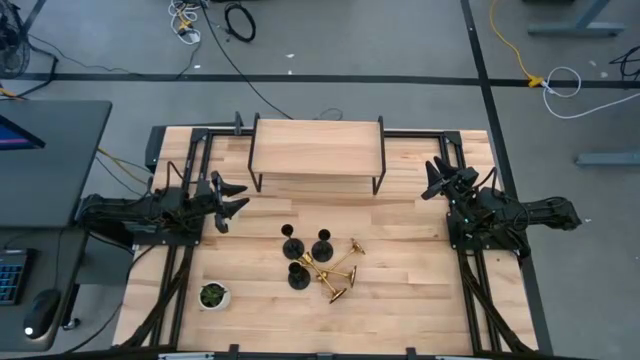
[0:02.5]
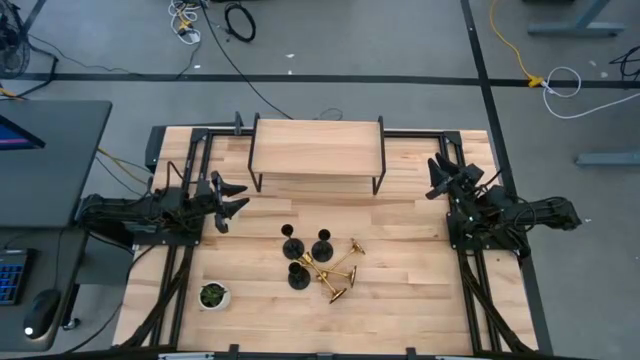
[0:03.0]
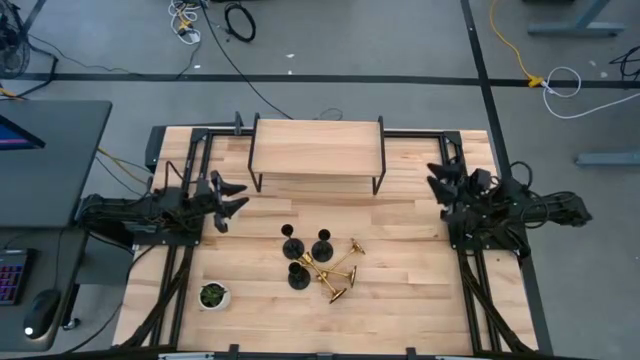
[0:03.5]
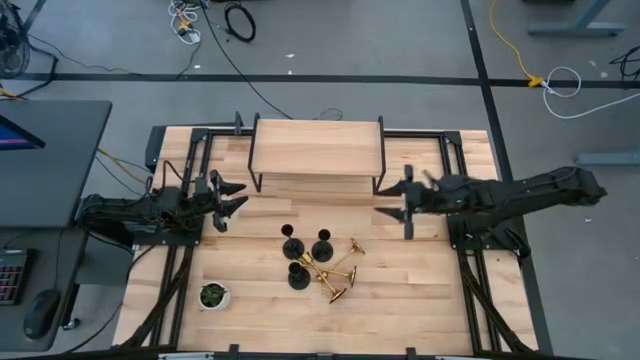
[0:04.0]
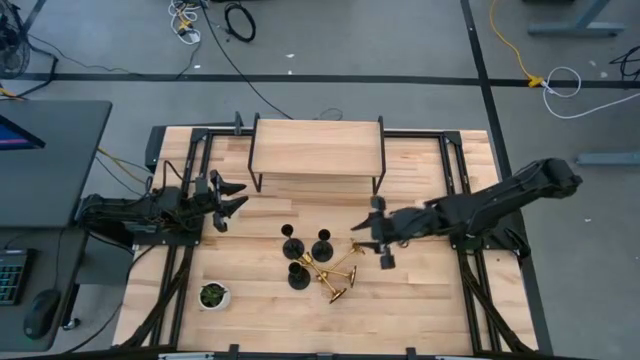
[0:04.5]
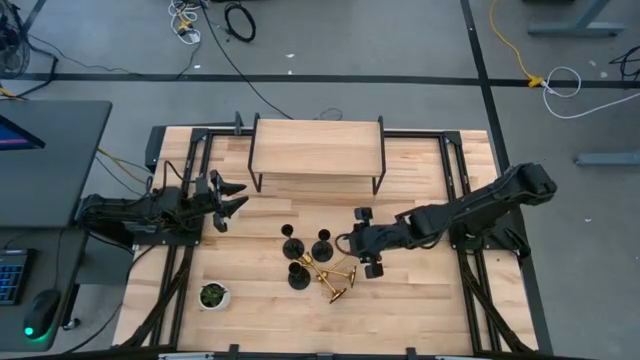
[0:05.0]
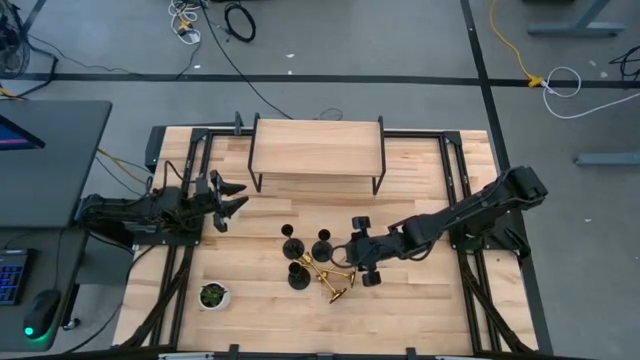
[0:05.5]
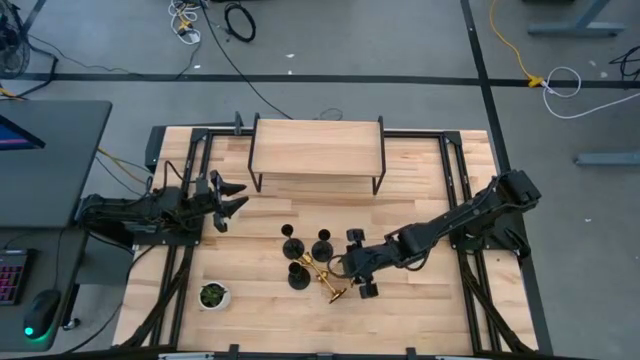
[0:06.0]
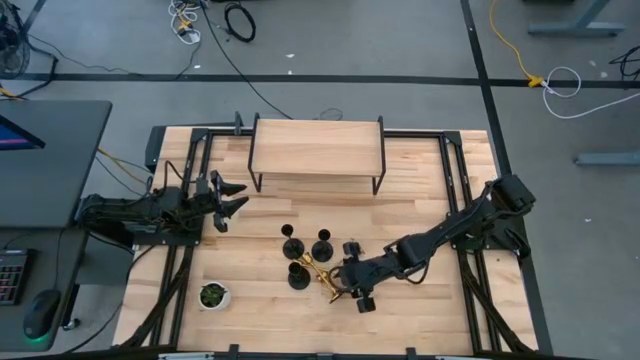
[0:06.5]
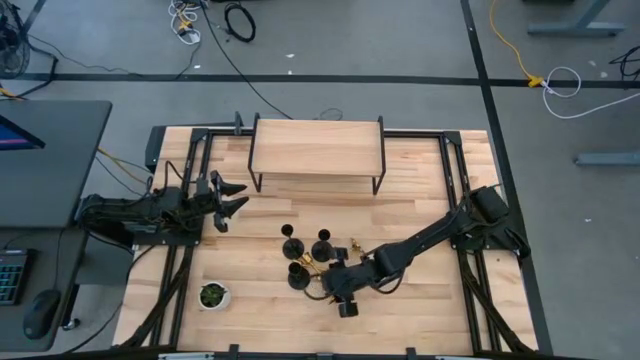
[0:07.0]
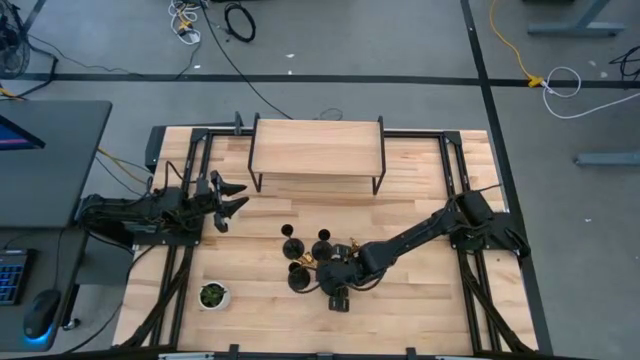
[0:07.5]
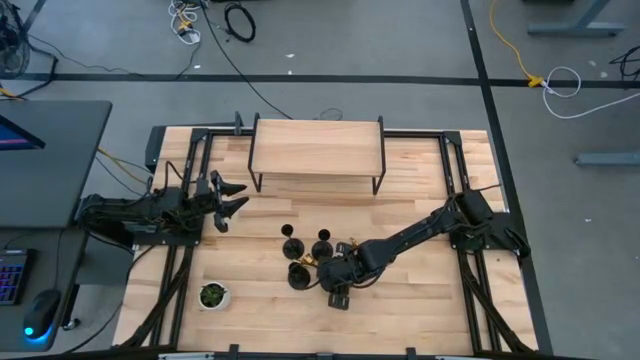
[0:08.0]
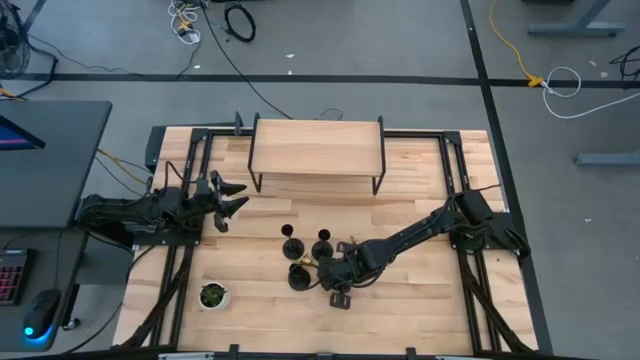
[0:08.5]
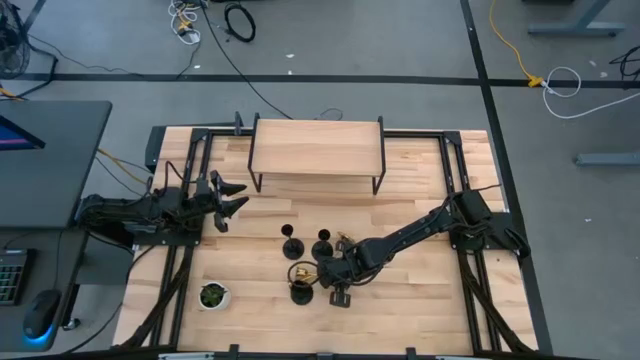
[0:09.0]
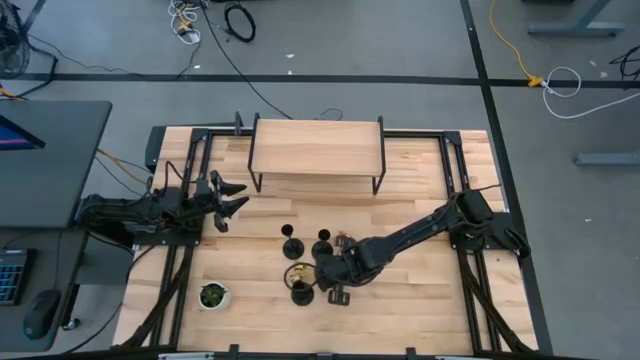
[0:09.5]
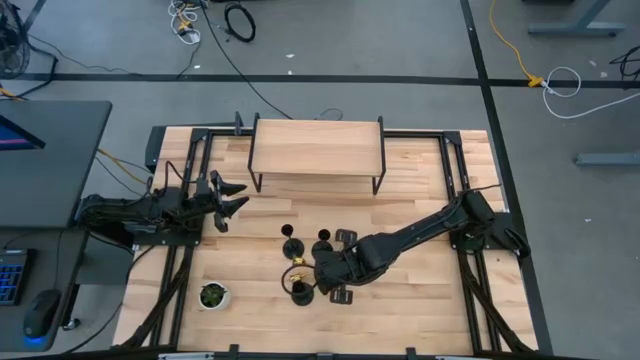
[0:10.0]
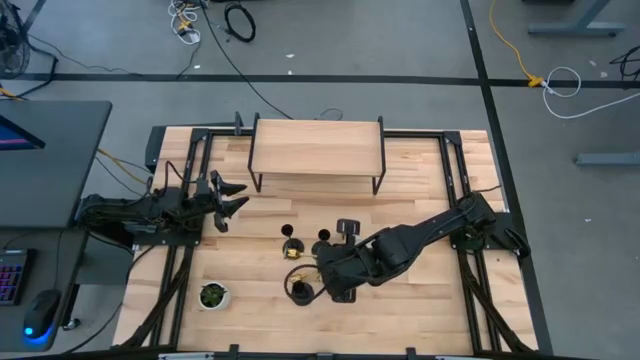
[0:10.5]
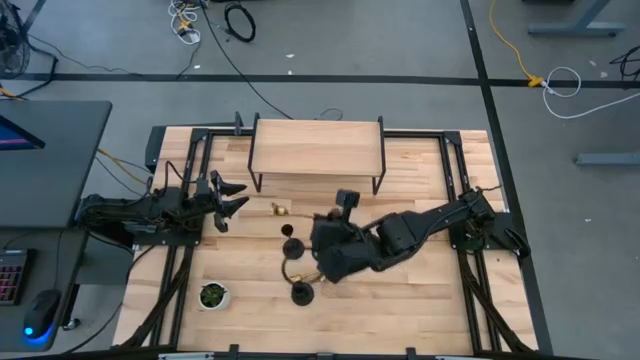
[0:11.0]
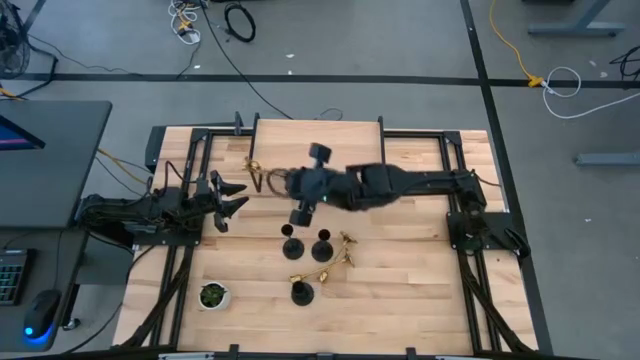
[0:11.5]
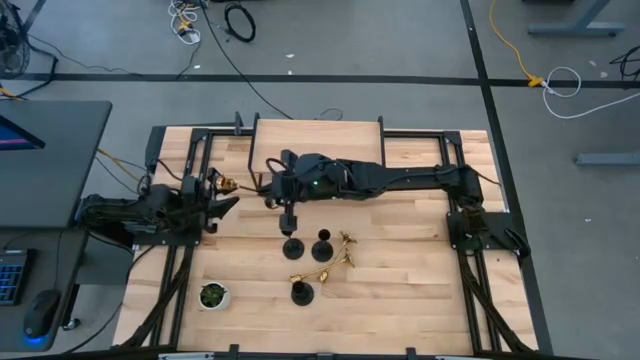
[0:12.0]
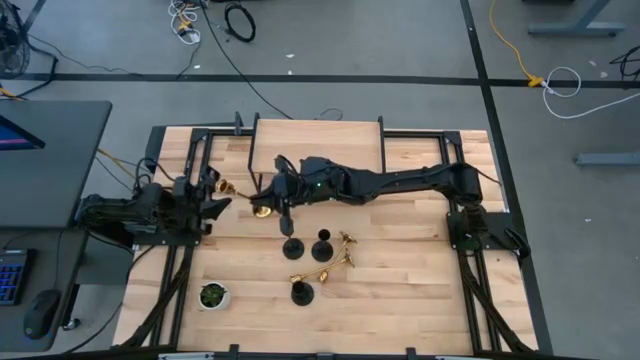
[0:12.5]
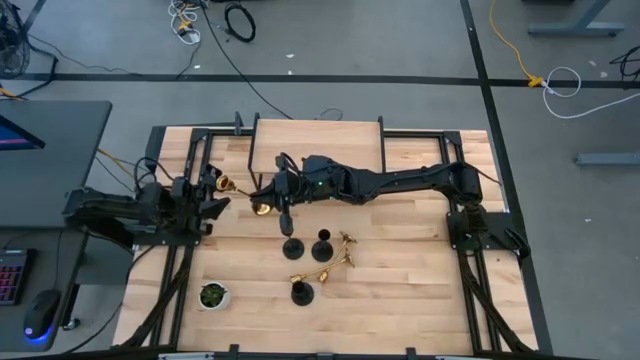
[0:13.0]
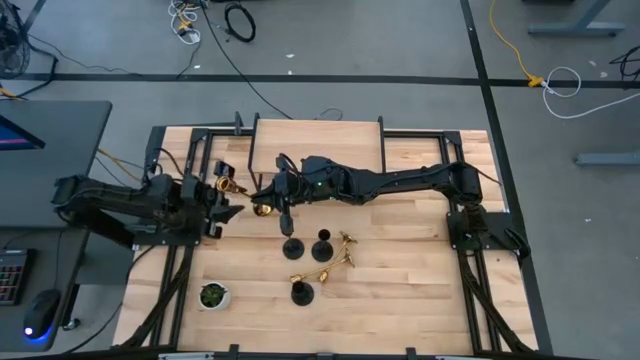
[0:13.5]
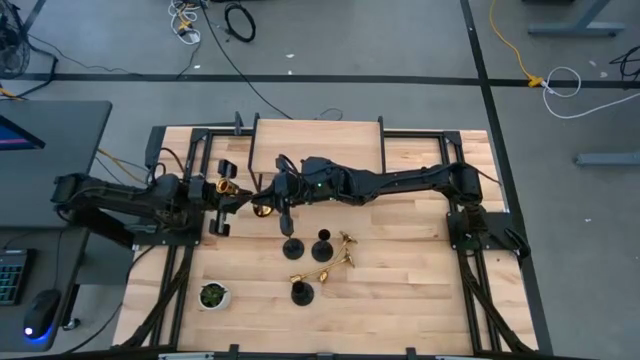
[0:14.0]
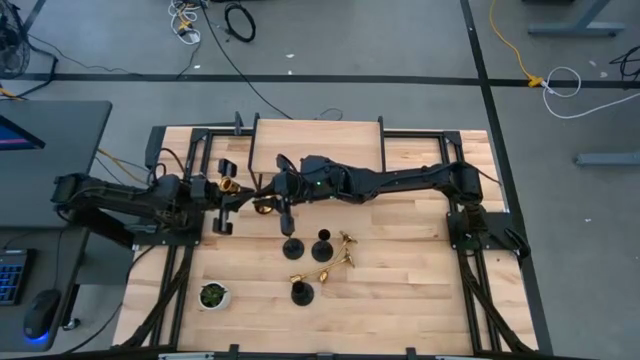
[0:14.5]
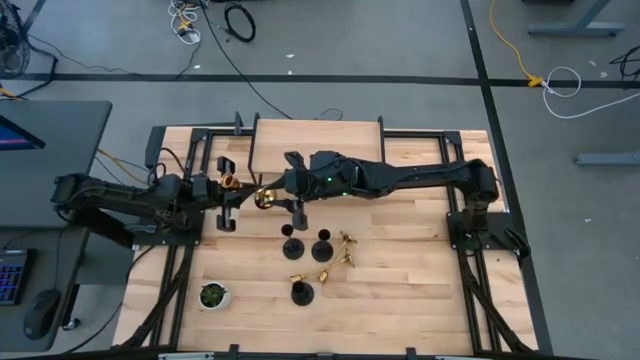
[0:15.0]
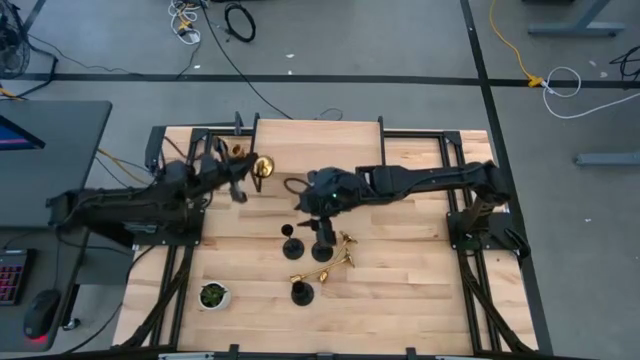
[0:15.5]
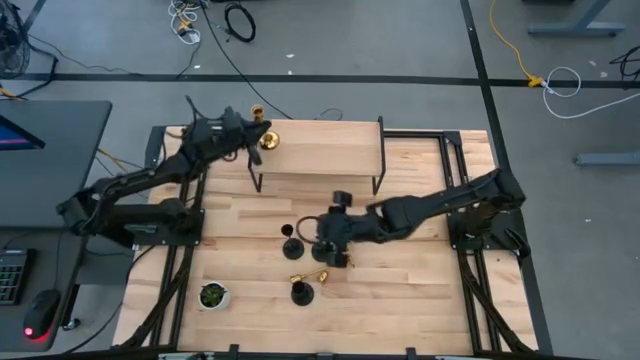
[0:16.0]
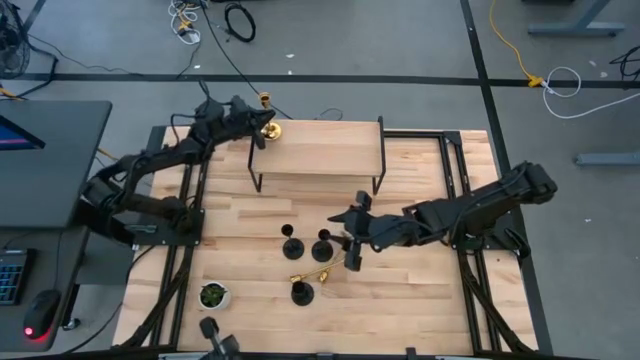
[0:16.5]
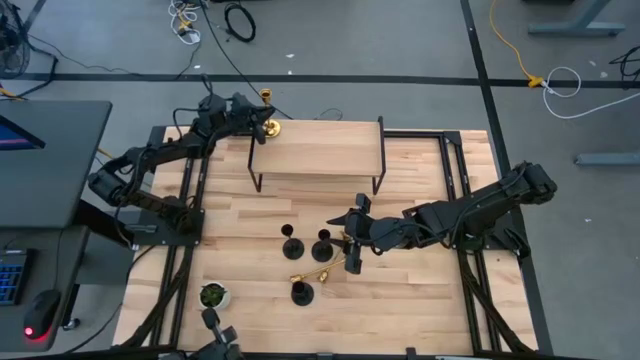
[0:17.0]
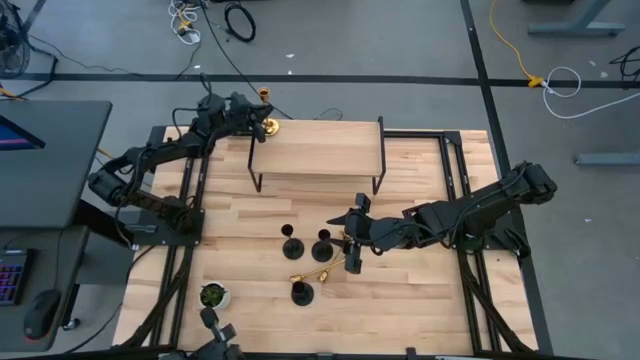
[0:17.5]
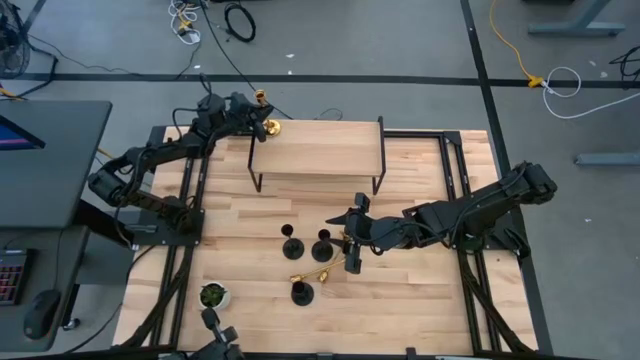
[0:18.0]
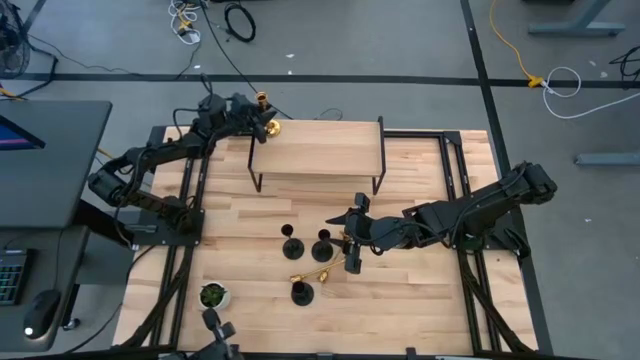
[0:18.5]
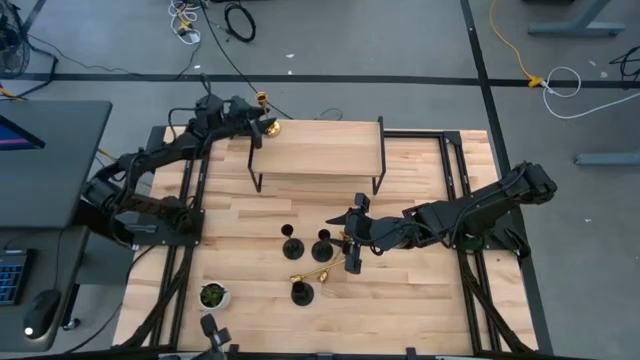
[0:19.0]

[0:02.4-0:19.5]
Task: Pick & Place candle stick holders
Put the bottom gold candle holder on the shelf

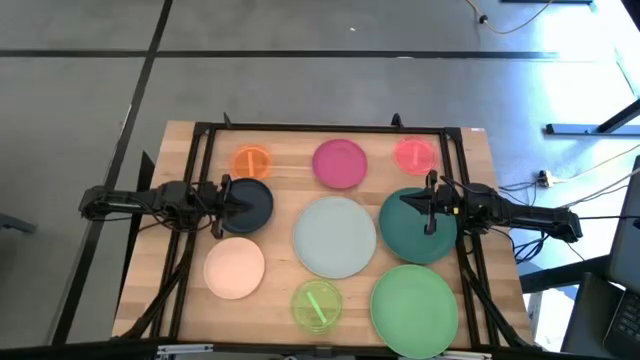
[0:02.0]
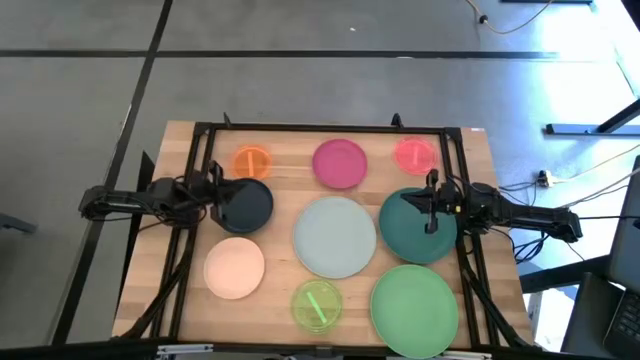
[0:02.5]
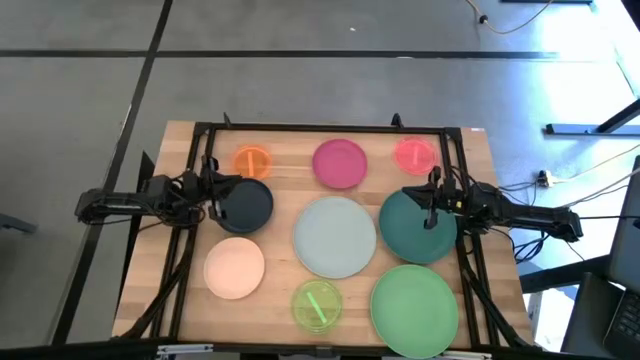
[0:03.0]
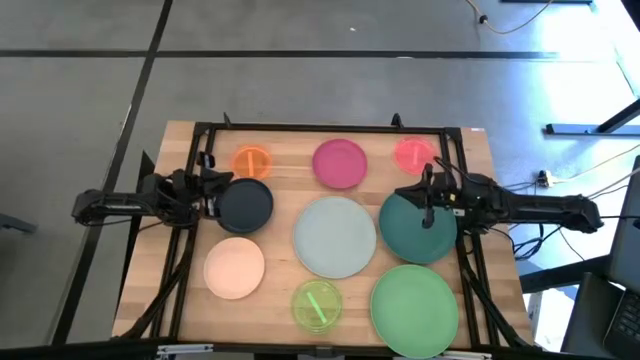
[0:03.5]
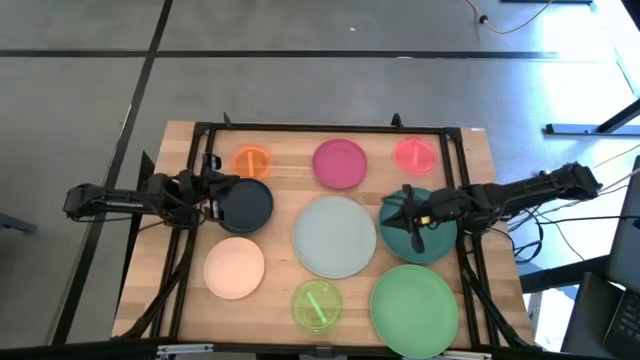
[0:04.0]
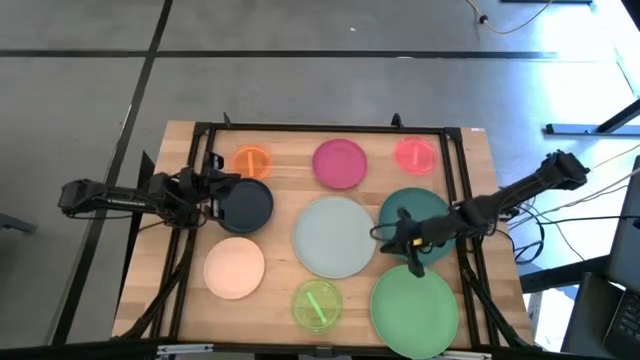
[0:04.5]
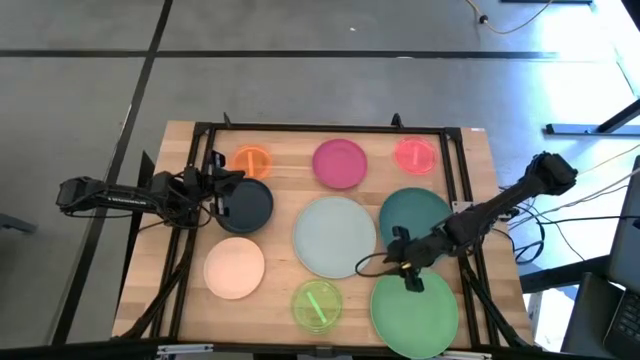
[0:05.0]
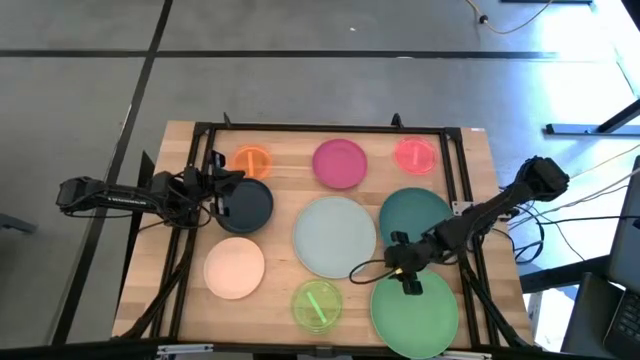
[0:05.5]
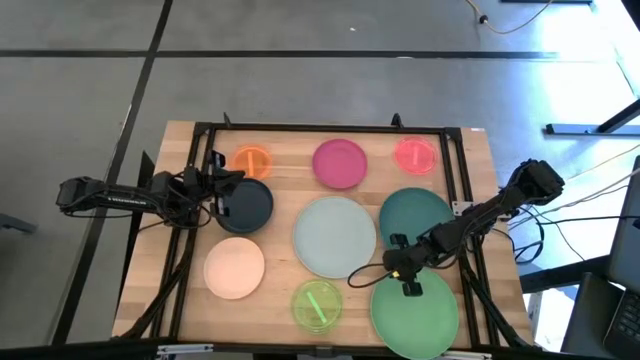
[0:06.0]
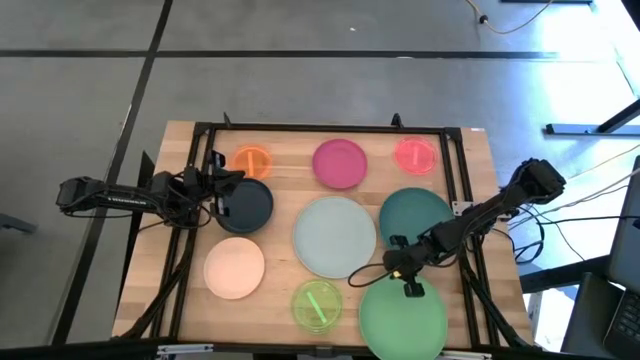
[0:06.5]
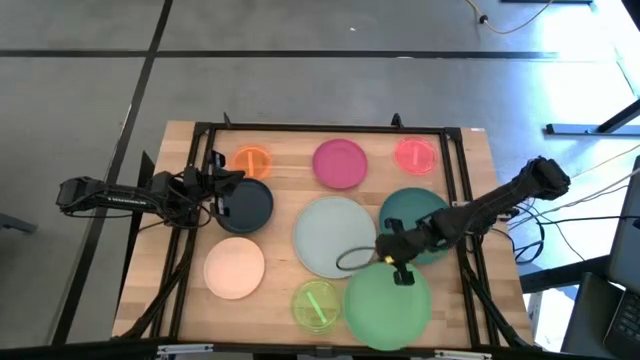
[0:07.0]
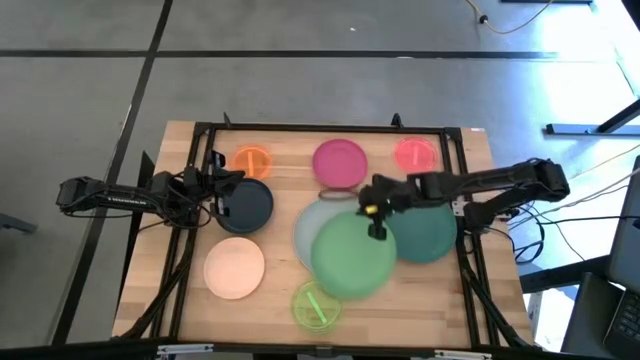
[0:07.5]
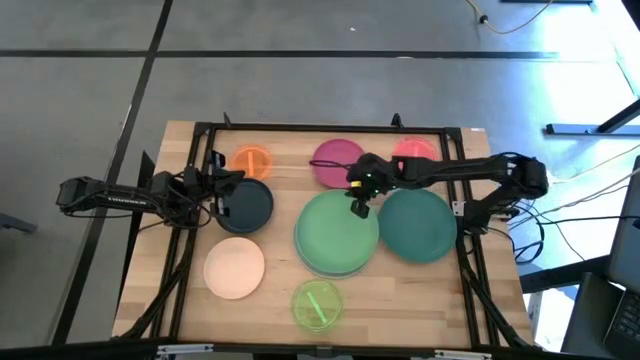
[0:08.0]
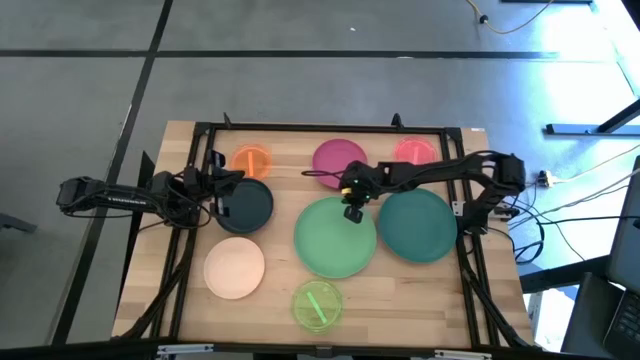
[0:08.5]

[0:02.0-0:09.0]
Task: Stack plastic plates
Stack the light green plate on the gray plate
